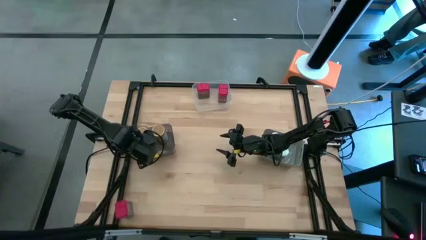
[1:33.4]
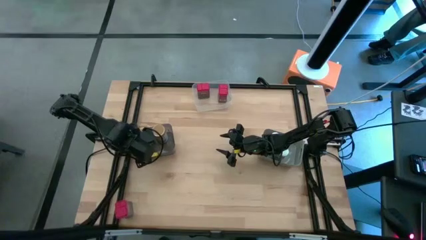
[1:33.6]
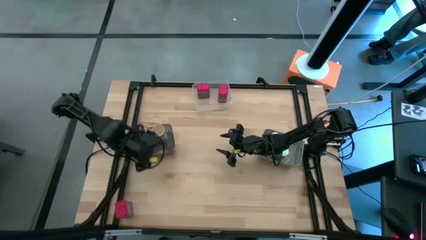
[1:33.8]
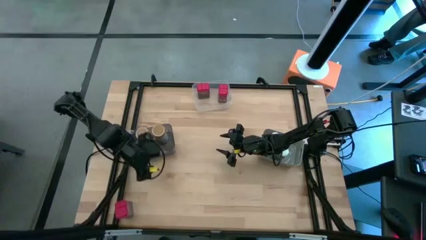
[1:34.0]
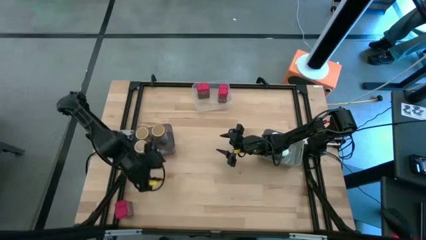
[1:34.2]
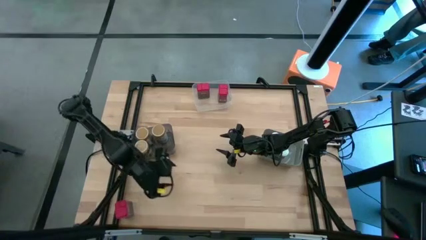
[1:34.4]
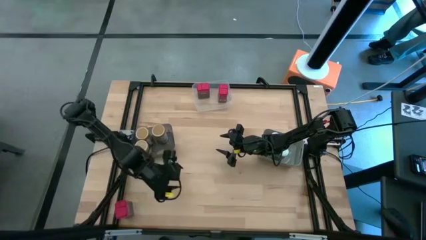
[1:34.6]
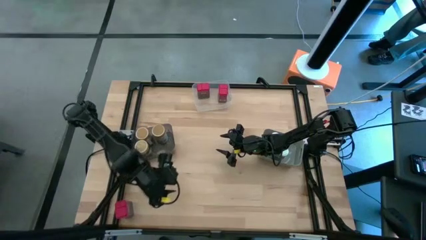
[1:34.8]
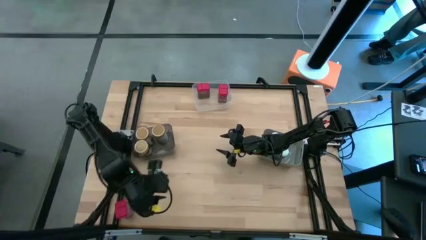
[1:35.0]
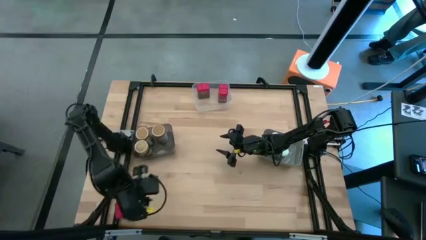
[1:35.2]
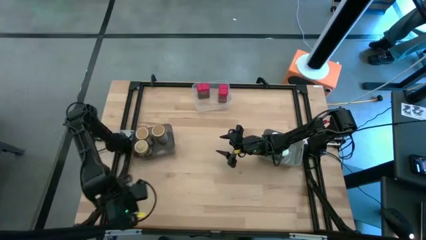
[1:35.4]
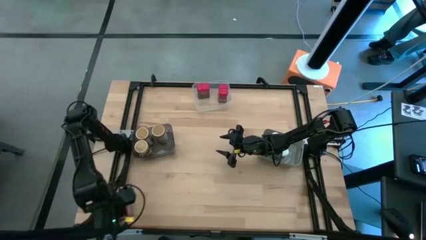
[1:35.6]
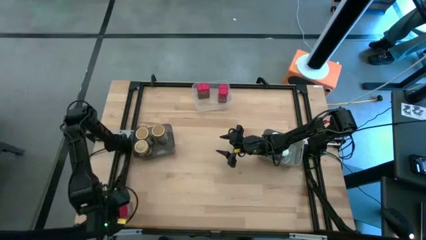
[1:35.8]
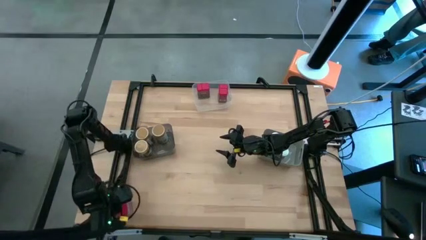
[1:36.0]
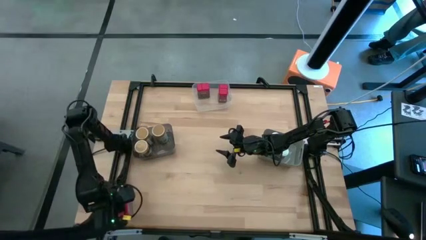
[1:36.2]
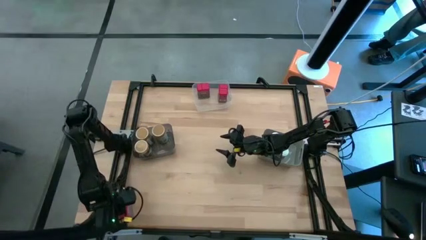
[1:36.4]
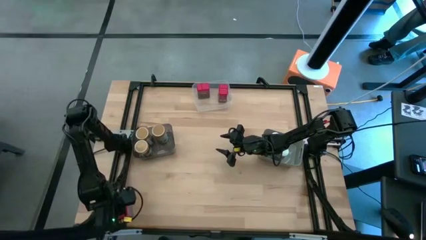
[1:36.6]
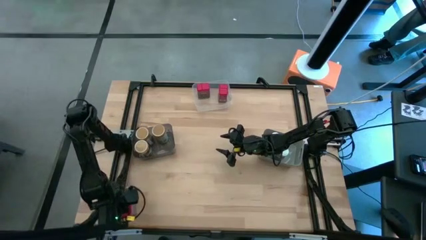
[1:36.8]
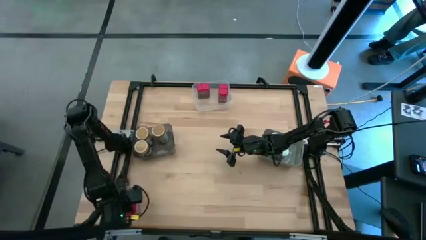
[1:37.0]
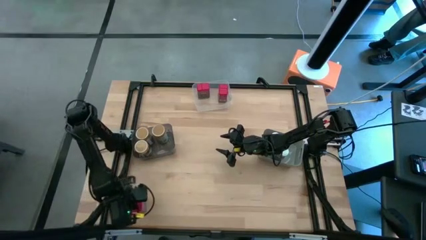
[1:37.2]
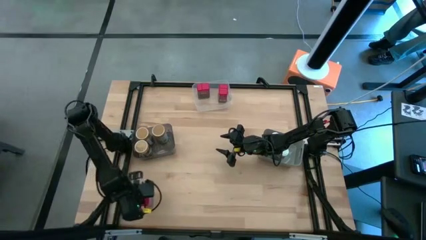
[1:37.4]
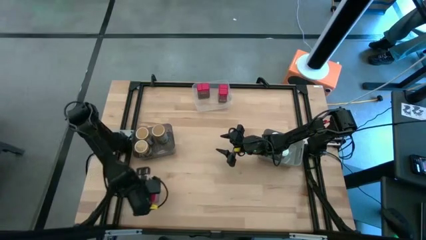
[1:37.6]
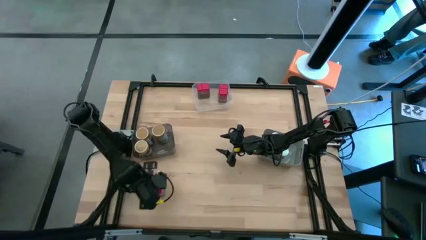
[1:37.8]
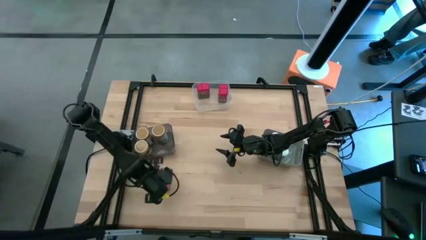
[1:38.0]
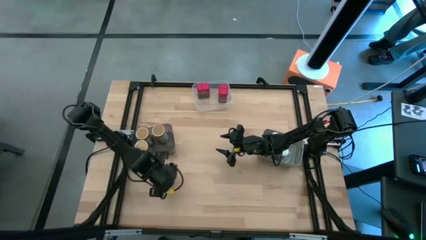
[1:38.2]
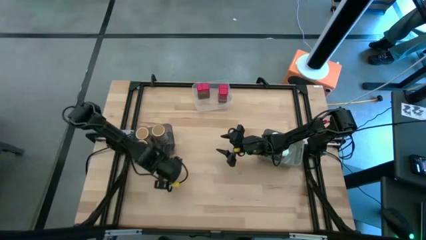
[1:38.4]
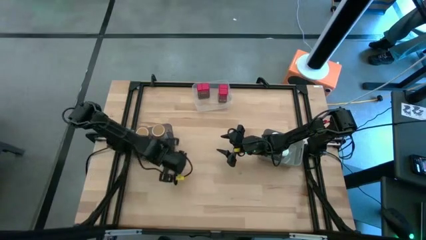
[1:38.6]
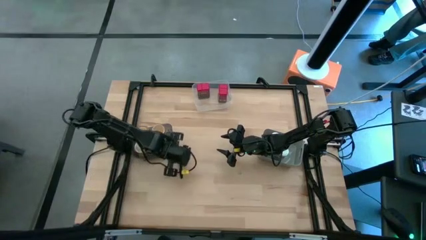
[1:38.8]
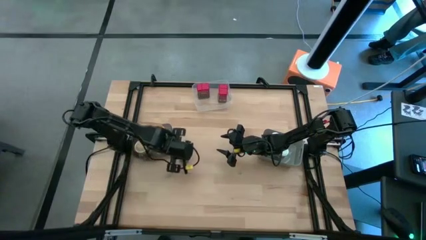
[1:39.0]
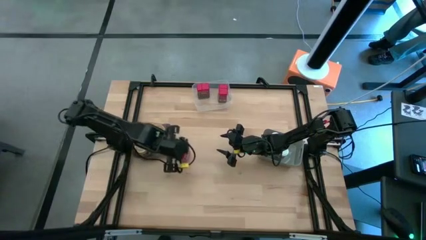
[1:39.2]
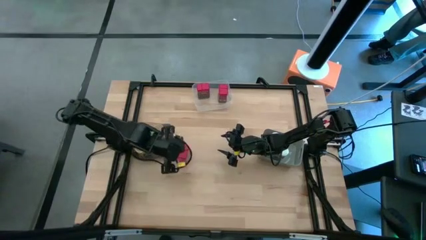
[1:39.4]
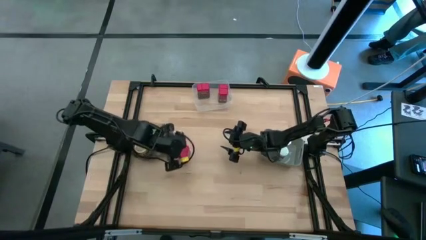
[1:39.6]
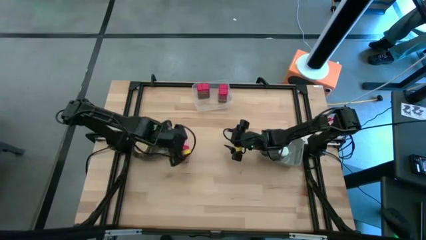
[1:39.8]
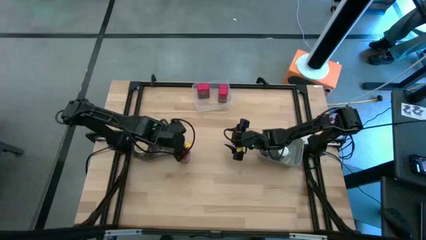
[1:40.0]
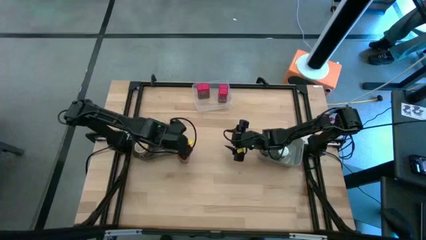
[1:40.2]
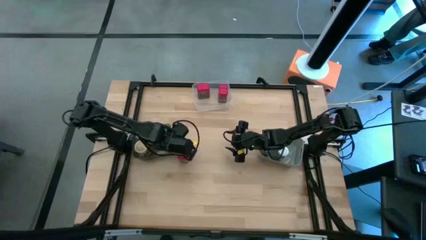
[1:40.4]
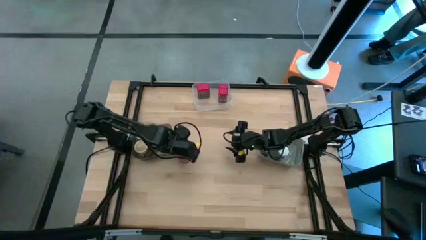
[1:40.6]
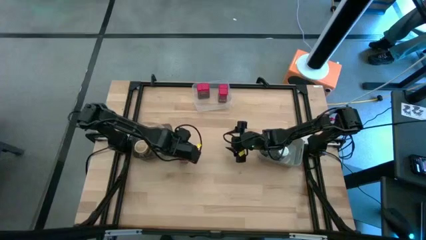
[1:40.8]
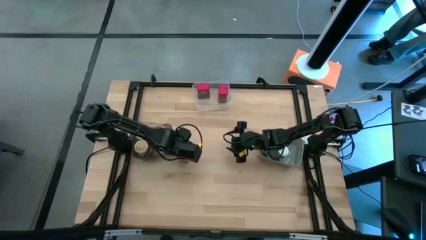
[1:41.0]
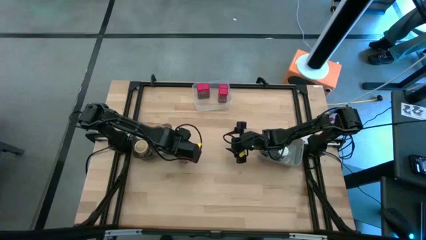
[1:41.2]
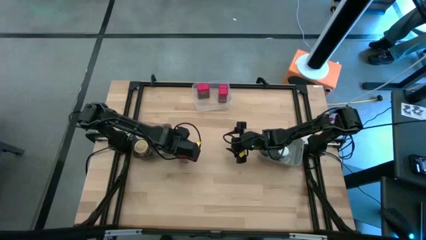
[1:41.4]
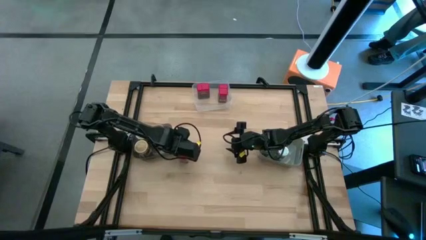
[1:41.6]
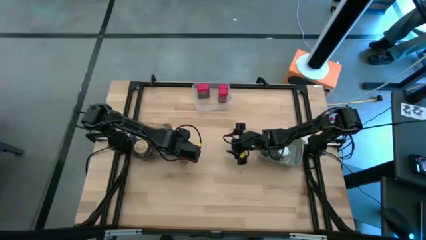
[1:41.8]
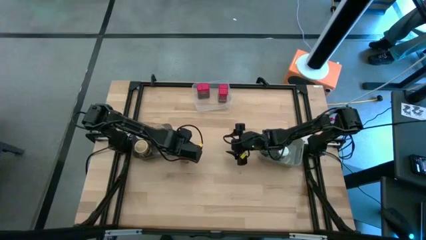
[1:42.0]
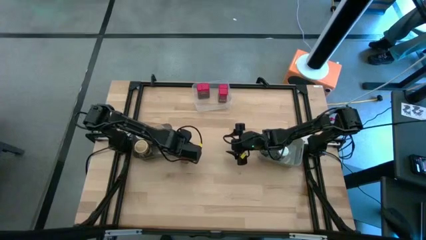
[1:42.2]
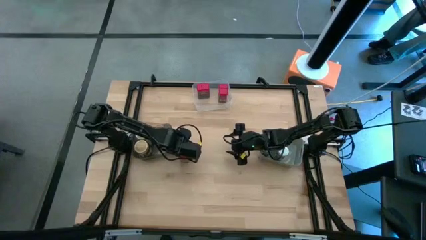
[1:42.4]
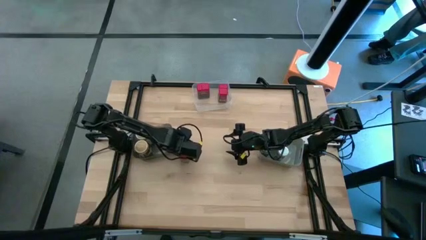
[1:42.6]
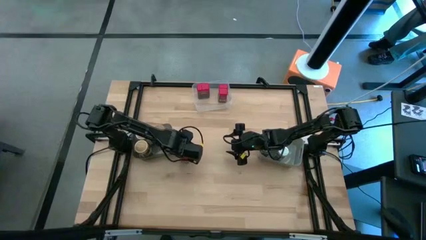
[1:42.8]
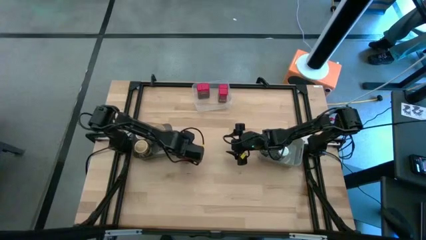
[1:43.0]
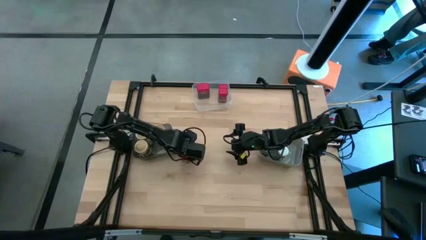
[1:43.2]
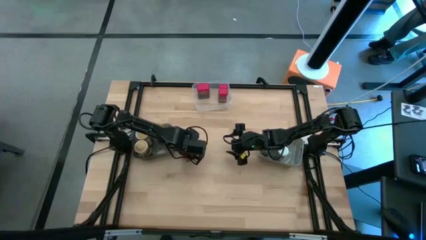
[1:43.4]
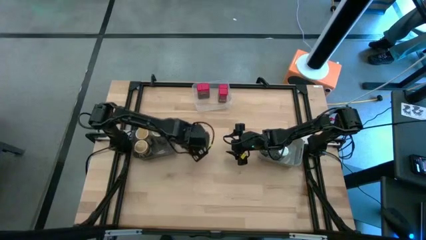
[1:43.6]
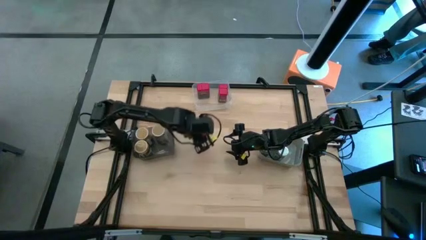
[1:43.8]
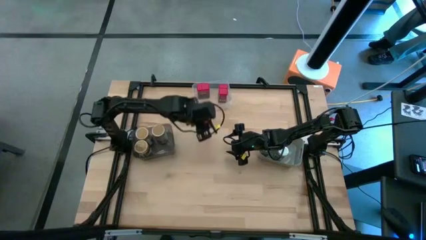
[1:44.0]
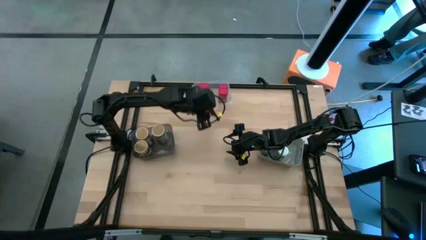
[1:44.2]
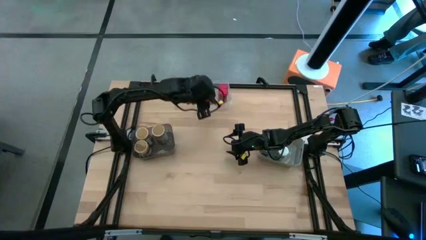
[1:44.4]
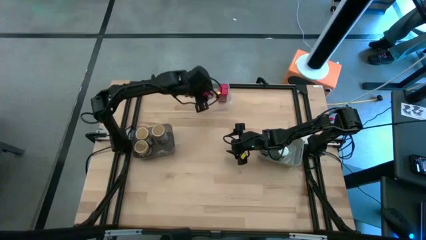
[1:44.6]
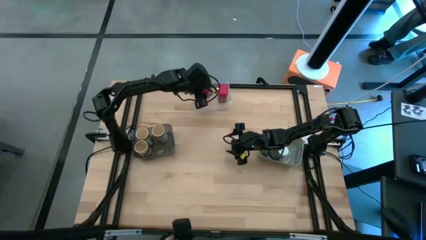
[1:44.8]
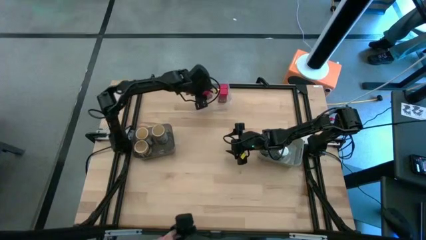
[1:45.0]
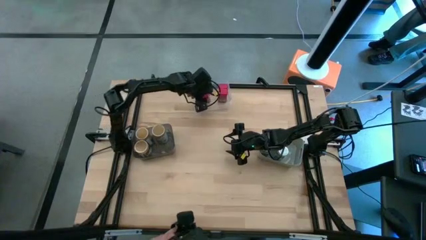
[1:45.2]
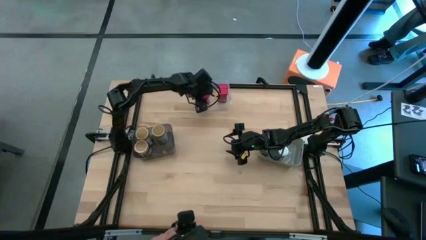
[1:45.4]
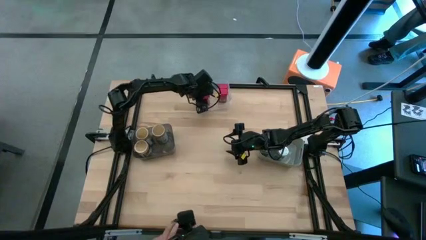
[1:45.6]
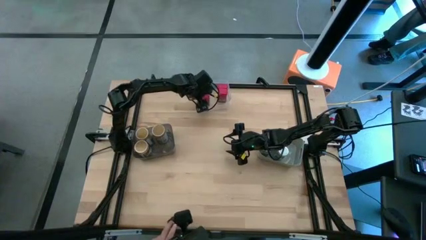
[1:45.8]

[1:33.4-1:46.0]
Task: Sort spices by type
Put the red seasoning bottle into the transparent bin

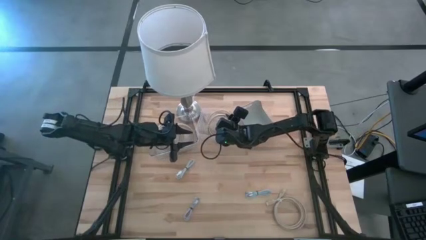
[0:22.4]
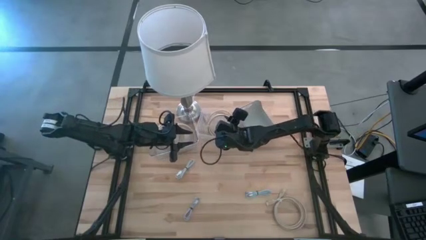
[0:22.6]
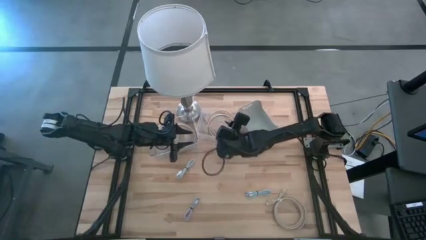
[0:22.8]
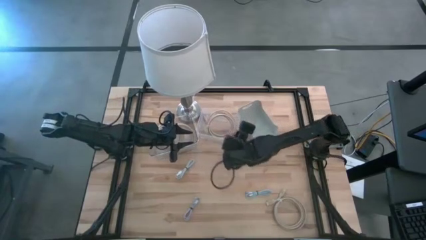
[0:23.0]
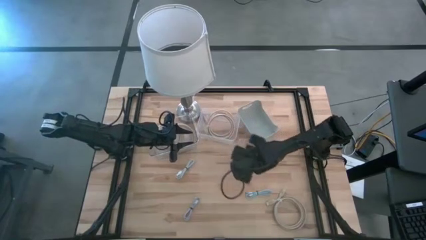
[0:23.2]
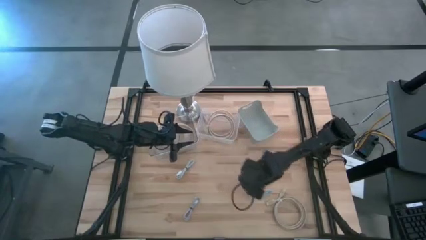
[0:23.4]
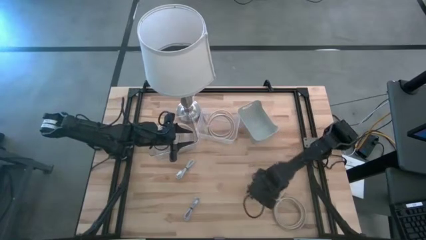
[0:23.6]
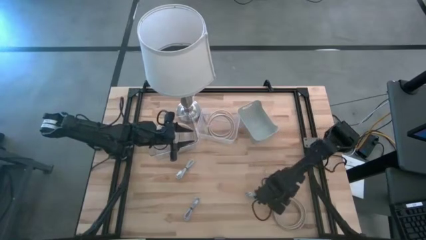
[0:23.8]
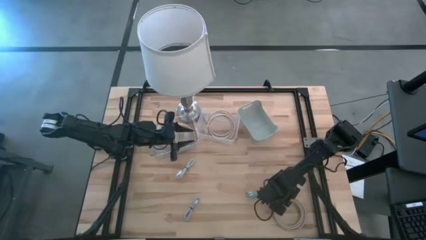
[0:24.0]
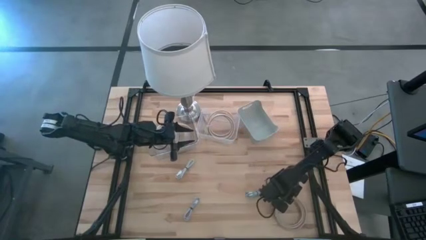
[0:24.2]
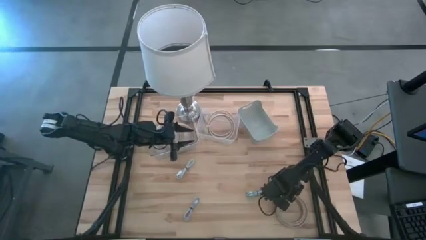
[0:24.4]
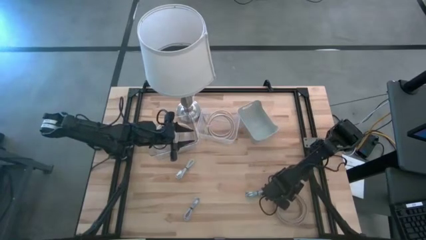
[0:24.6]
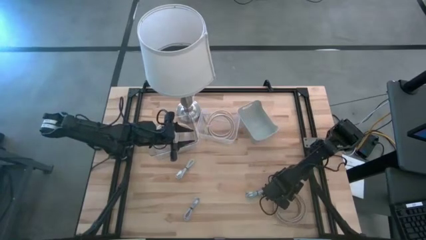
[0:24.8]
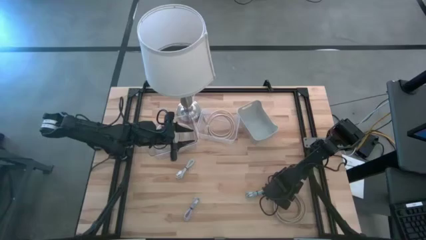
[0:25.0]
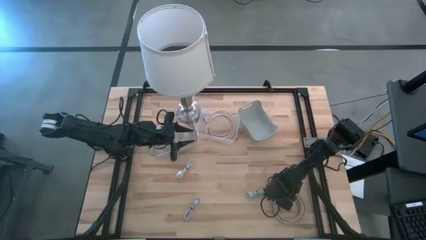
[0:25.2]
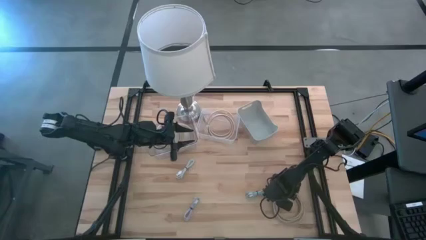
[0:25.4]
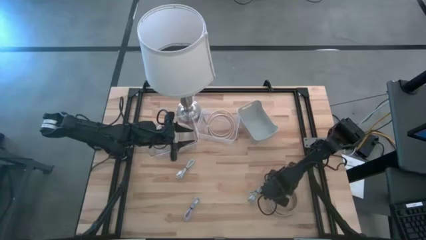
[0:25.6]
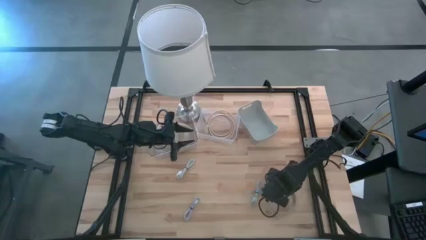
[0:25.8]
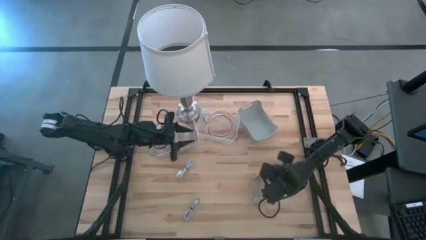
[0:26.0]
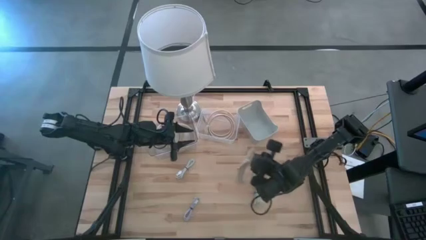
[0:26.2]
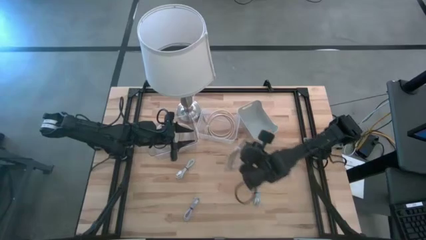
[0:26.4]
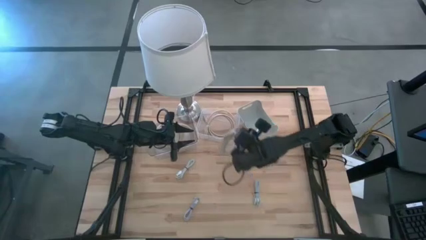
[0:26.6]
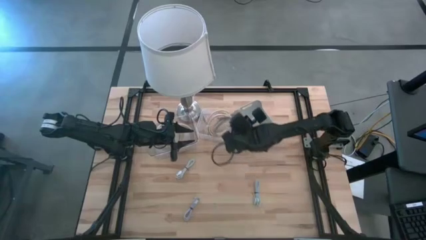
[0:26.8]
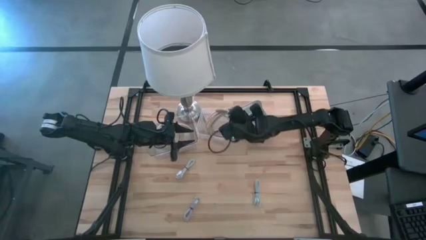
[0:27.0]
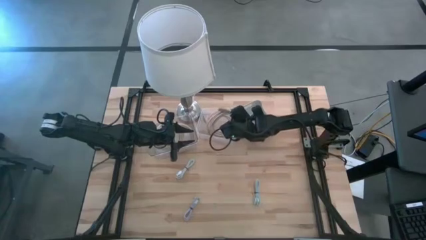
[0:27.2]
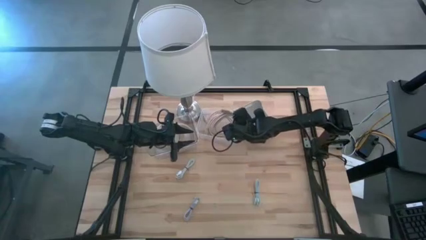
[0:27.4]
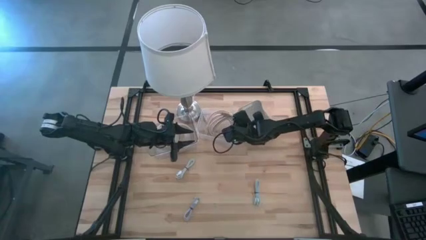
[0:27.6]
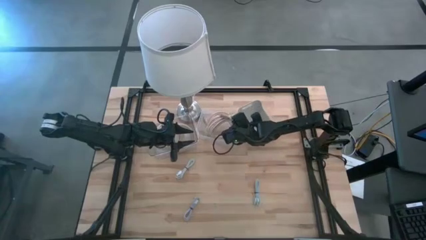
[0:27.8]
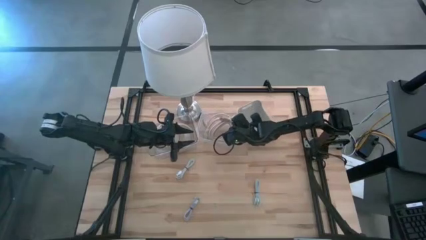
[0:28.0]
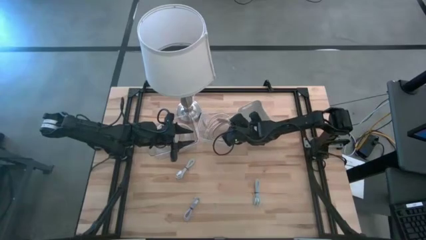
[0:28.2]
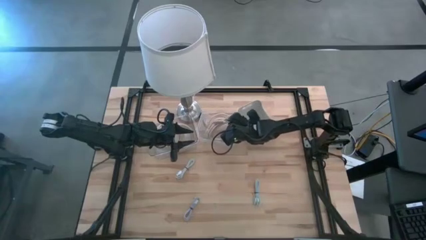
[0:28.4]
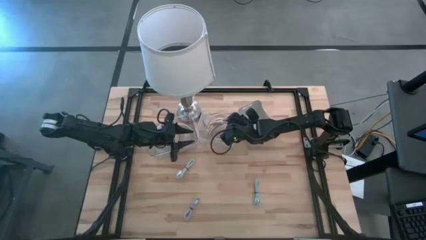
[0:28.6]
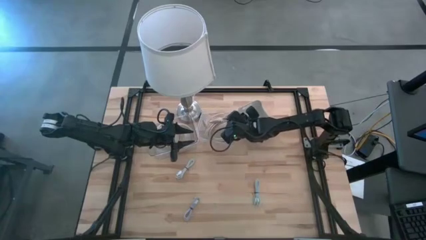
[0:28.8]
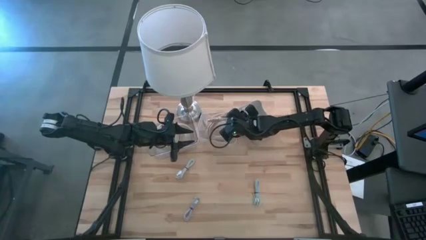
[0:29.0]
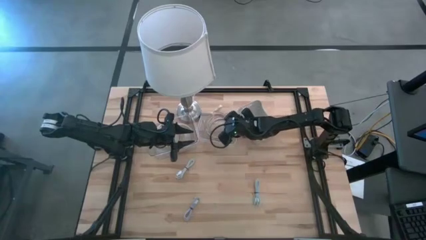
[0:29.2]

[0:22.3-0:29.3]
Task: Pick & Place USB Port
Put the brown HDMI cable into the white bin
